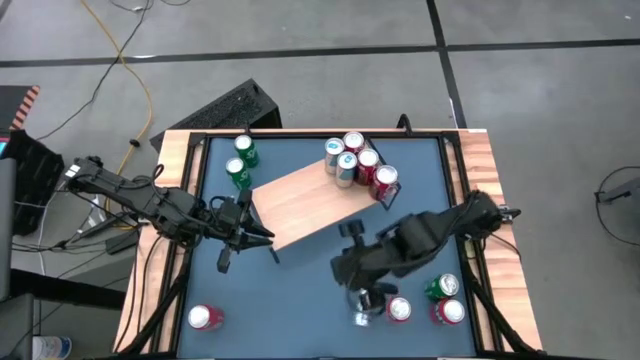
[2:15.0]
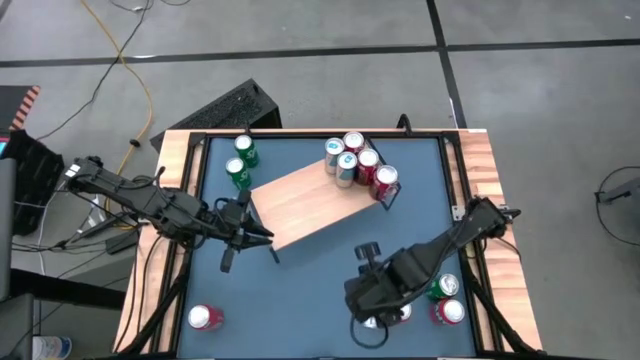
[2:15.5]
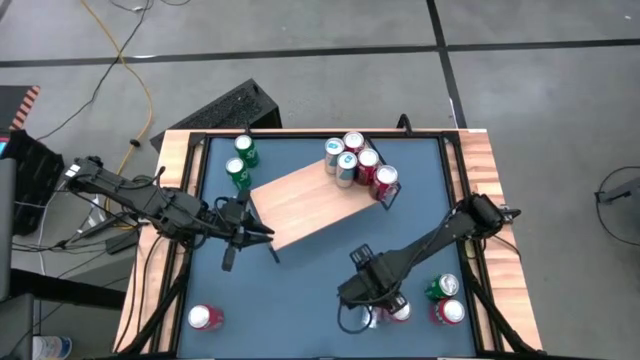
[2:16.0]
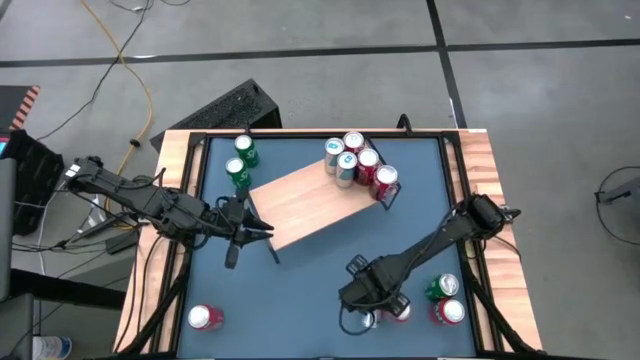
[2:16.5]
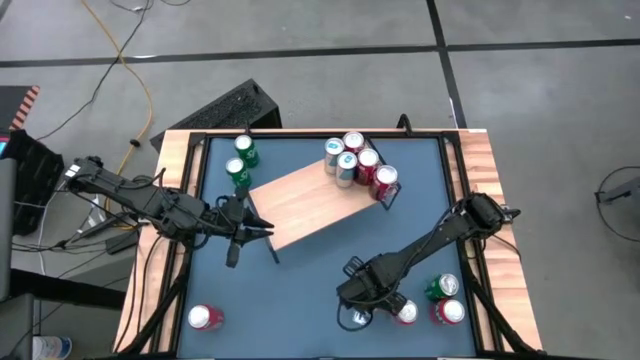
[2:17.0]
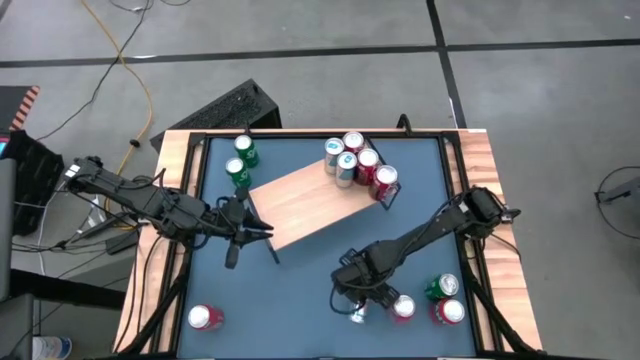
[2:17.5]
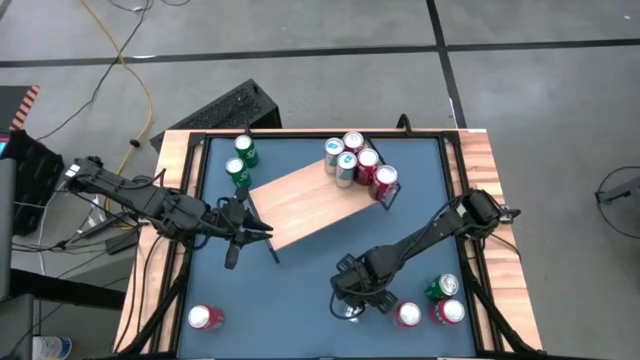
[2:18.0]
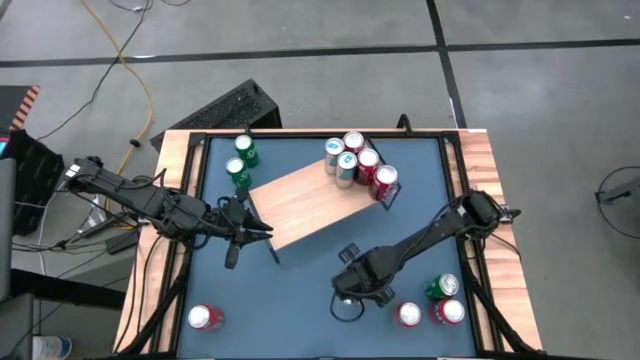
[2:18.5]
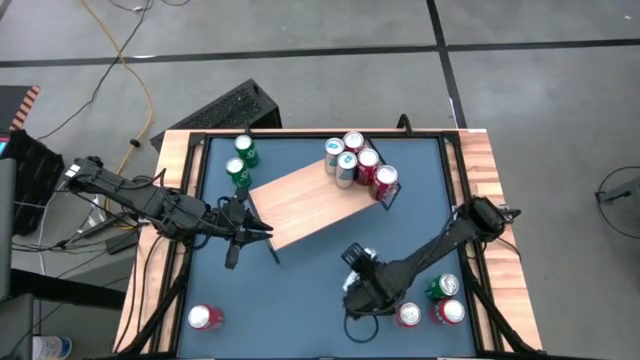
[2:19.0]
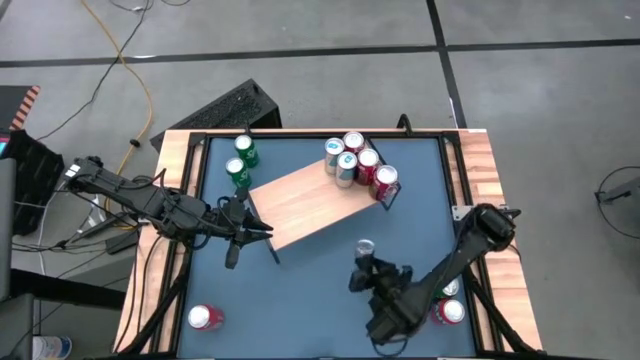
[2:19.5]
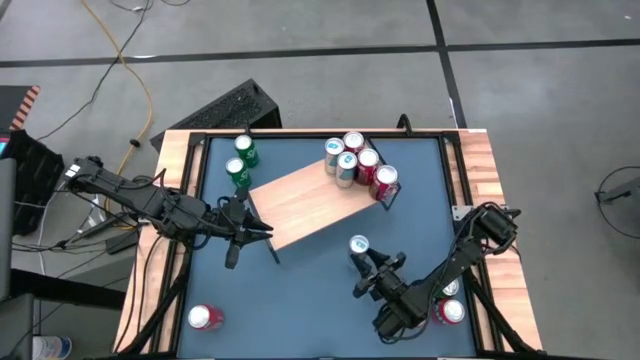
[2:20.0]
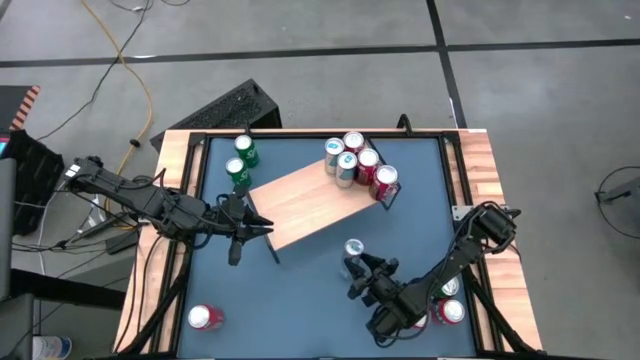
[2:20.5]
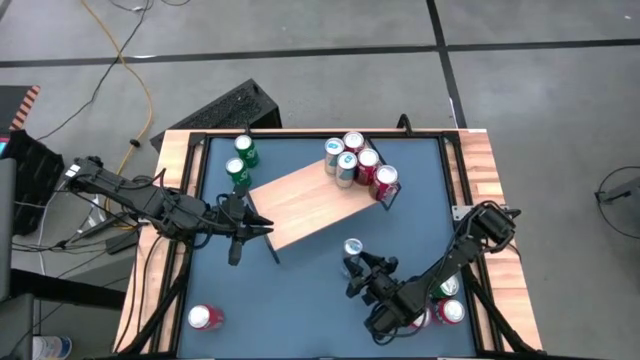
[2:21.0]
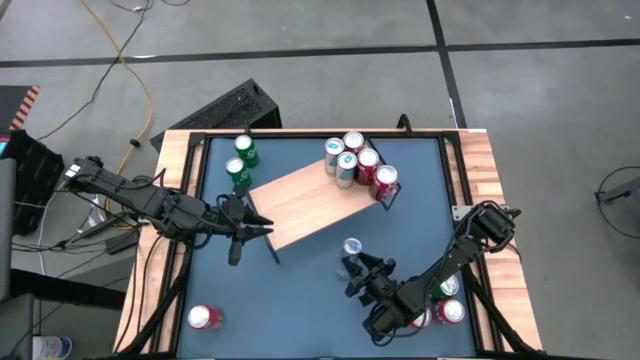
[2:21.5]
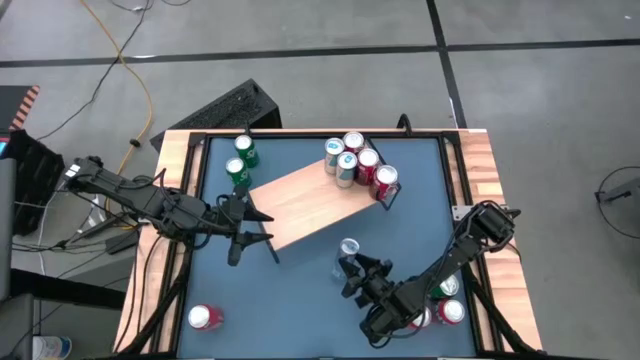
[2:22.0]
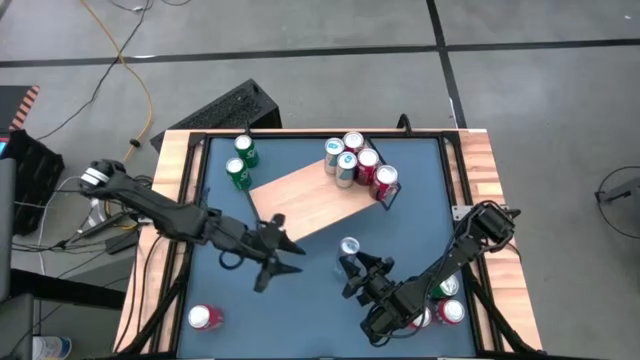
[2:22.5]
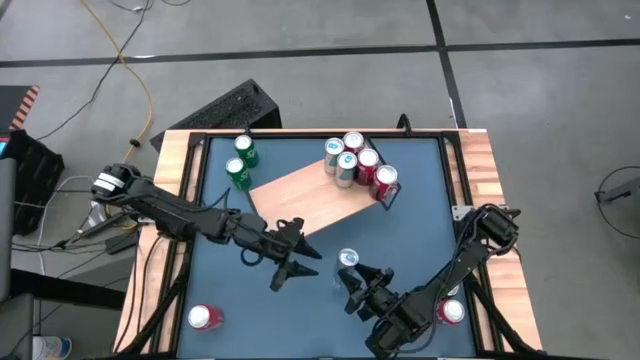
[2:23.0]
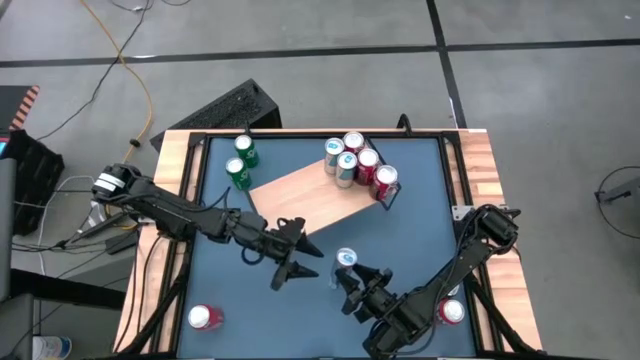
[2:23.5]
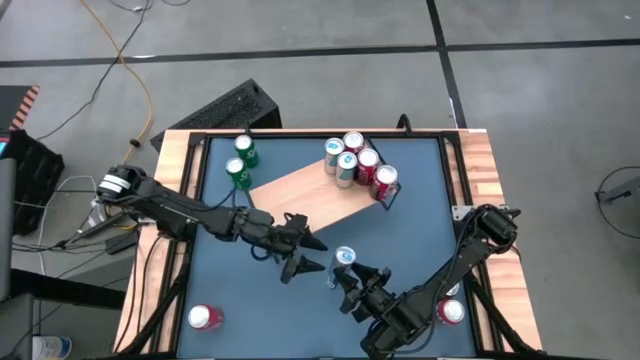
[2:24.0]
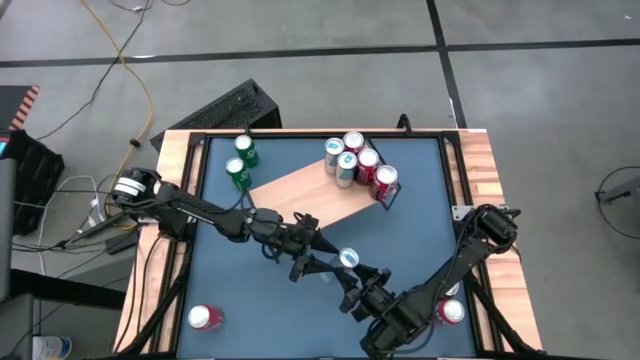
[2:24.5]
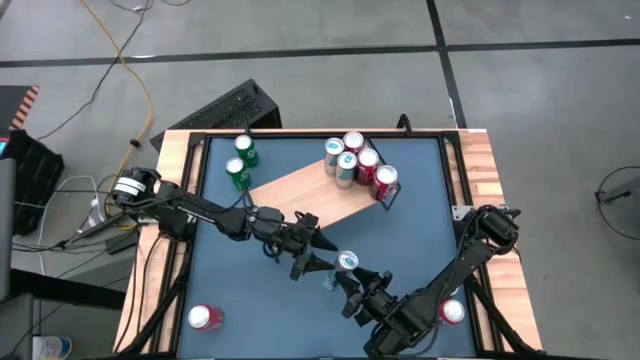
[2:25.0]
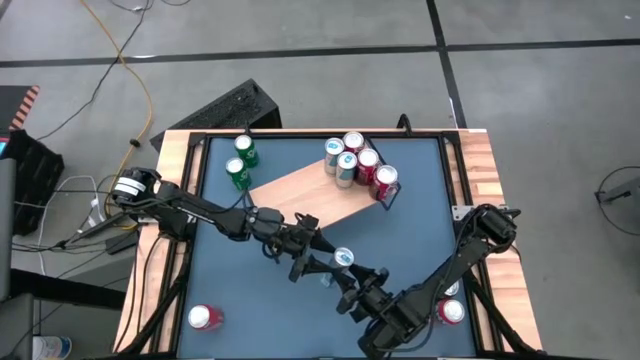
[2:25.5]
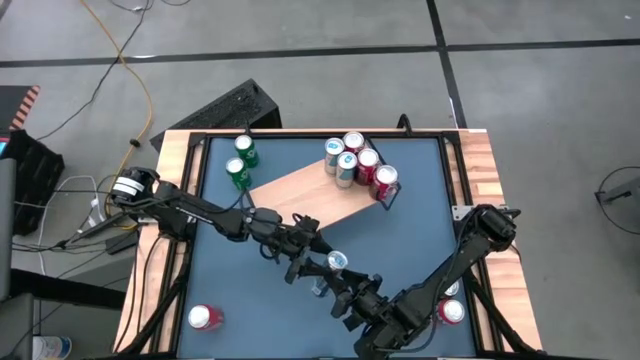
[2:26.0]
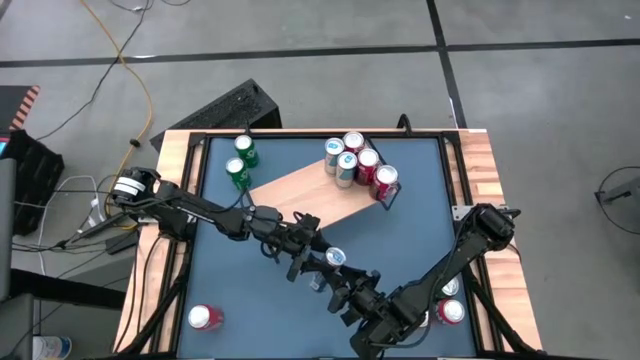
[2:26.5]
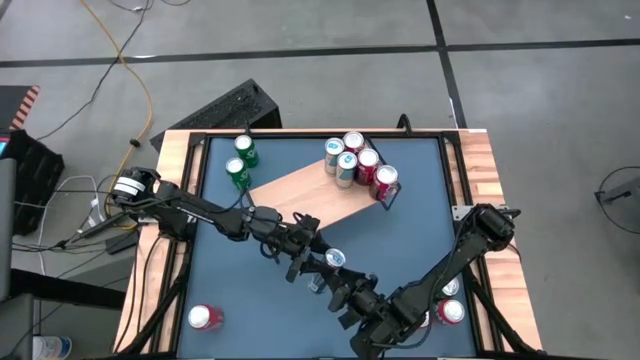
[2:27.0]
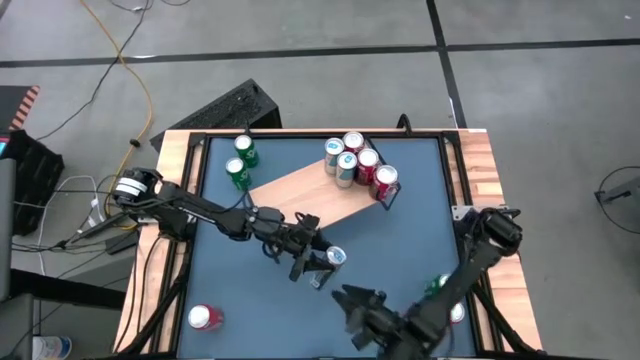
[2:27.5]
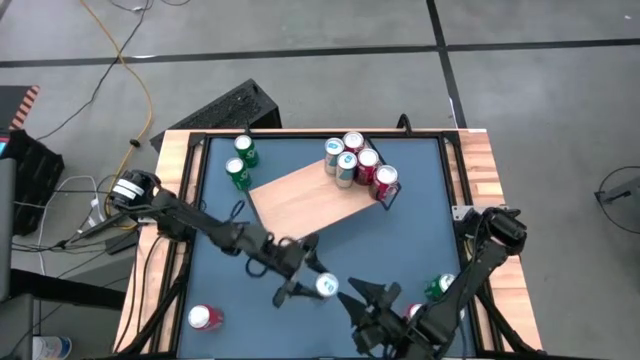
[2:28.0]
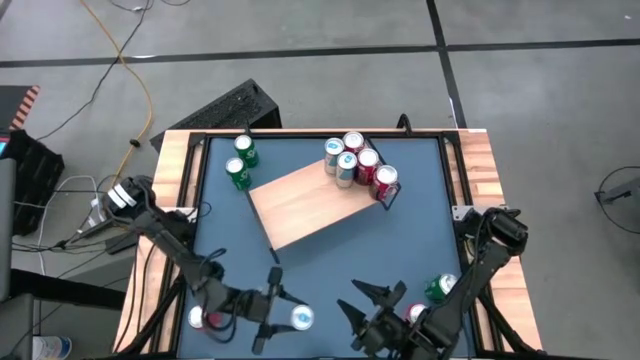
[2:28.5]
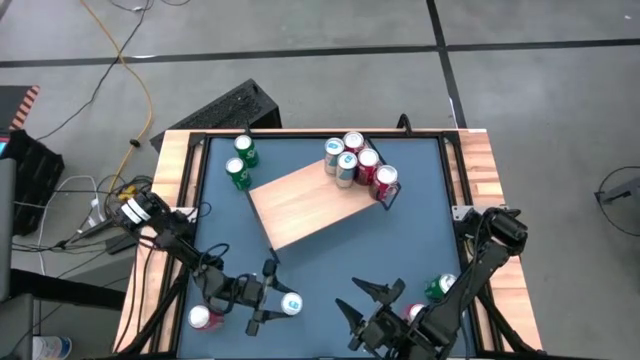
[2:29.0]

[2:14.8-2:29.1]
Task: Place canned beverage on shelf
Put the blue soda can on the shelf aligned with the other blue soda cans

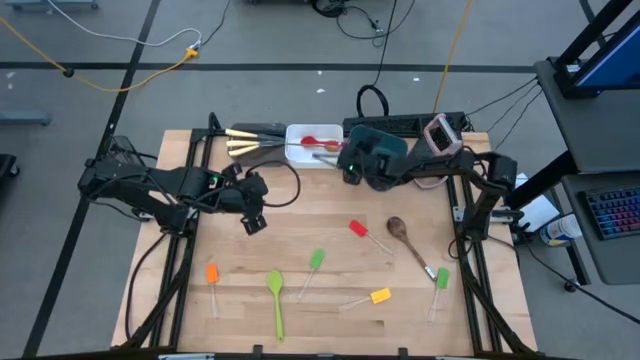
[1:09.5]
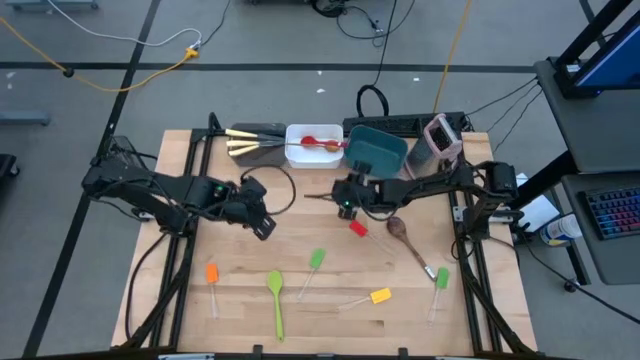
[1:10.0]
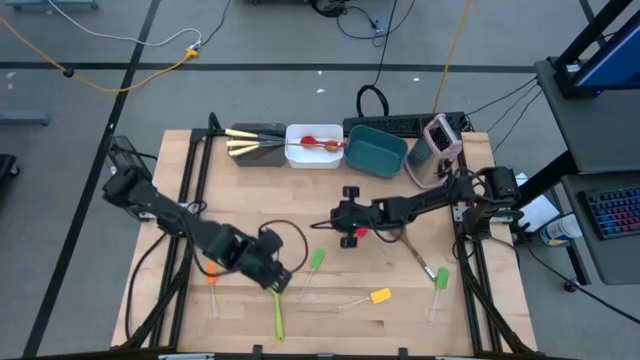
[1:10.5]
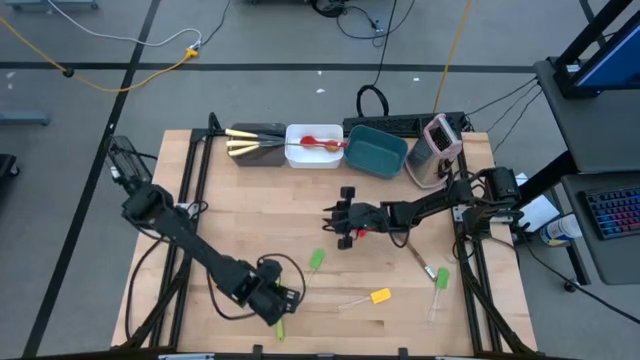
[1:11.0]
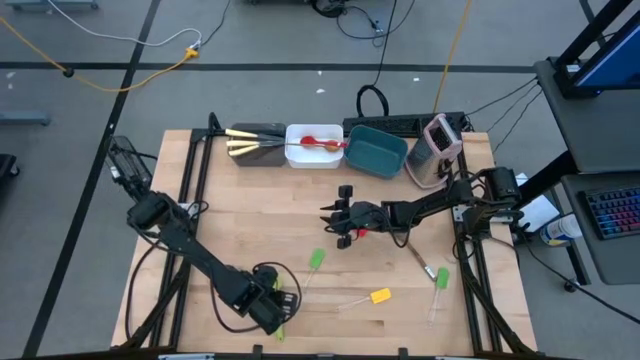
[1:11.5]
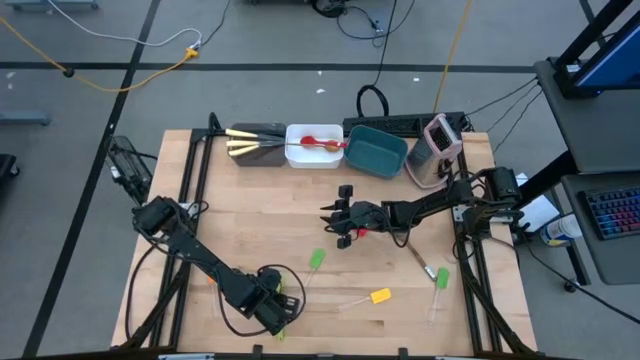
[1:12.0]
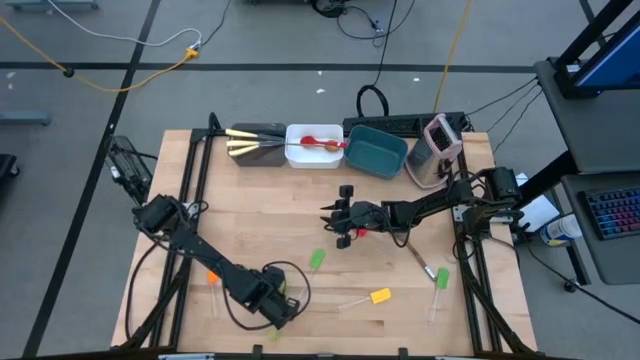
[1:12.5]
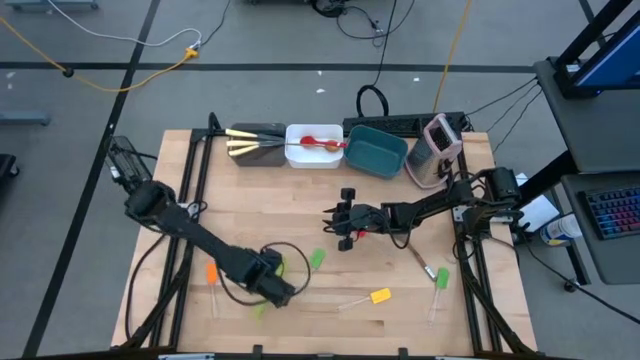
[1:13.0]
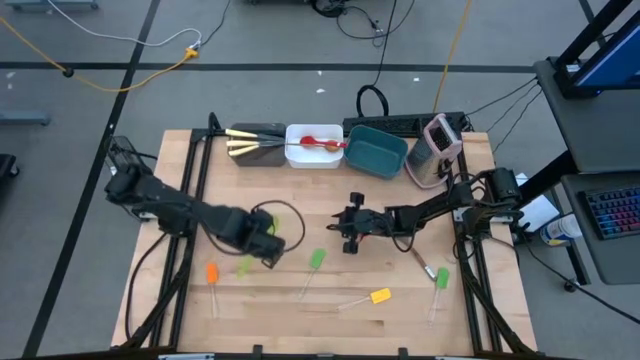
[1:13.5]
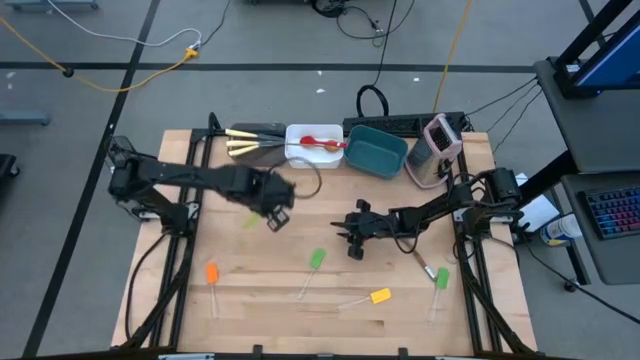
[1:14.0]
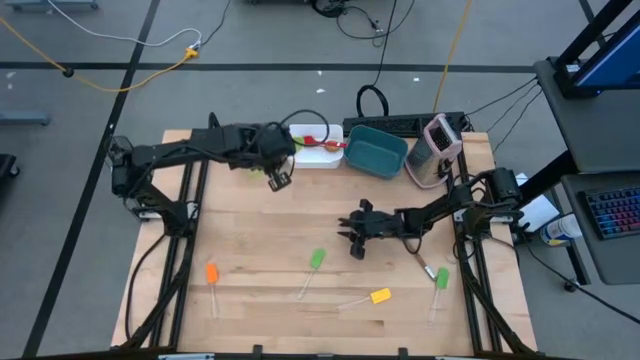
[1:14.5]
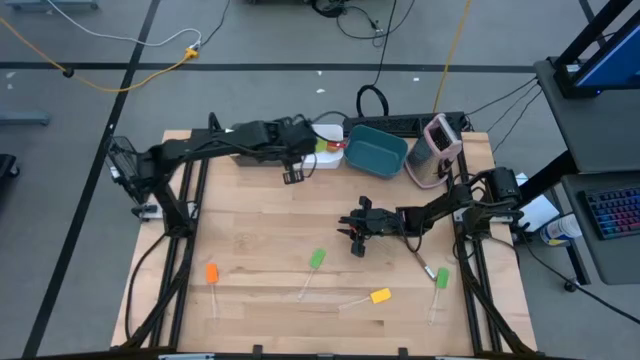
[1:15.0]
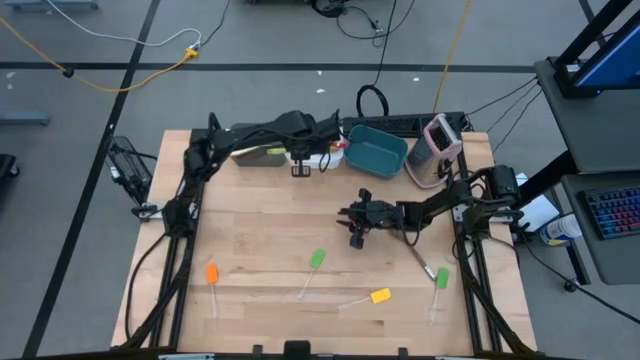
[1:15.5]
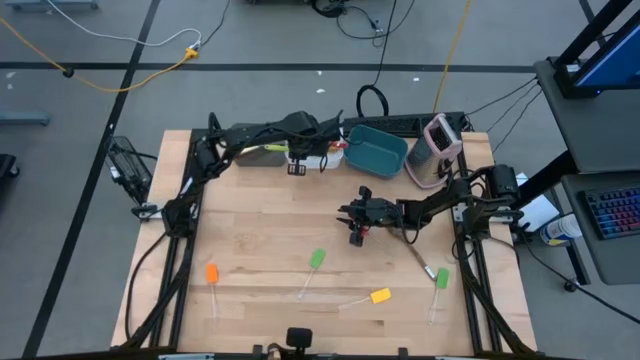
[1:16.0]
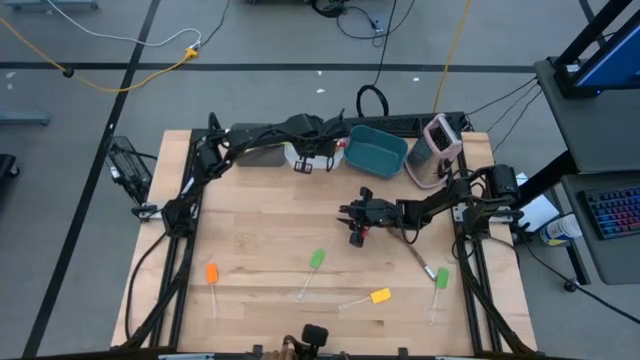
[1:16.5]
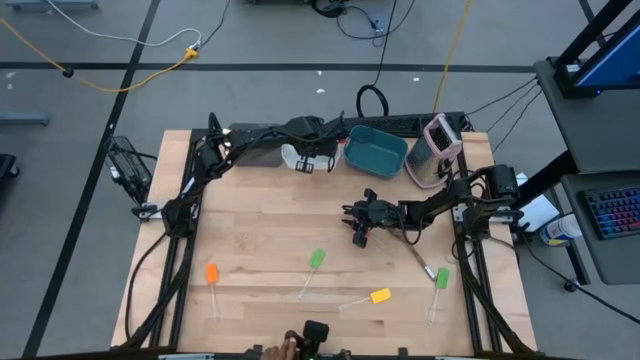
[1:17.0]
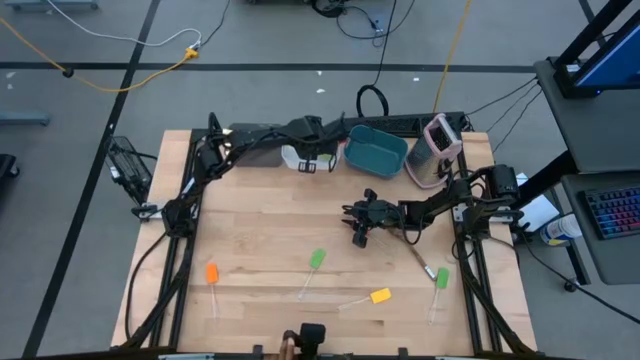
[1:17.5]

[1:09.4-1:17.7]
Task: Pick & Place Kitchen Items
Put the green serving spoon into the white bin
